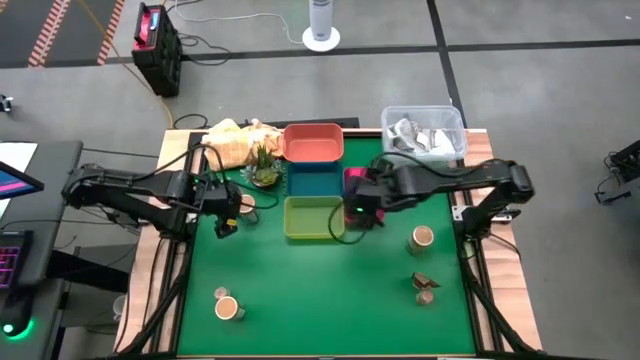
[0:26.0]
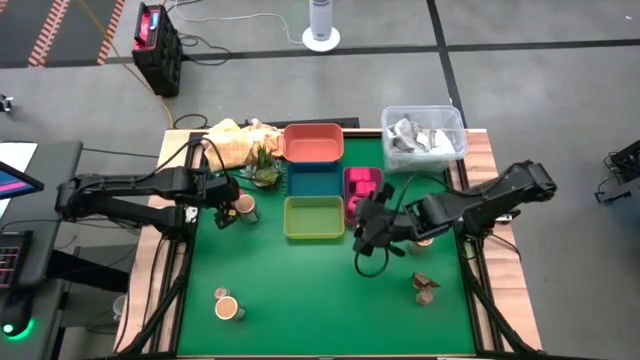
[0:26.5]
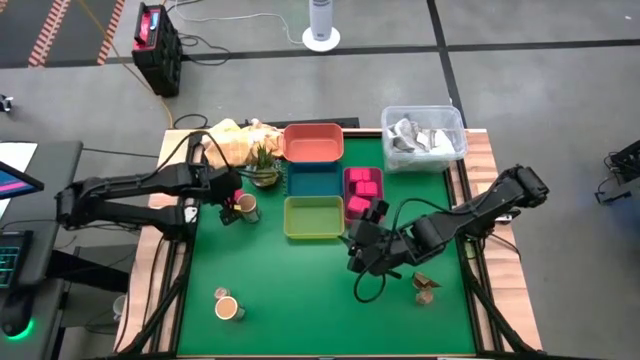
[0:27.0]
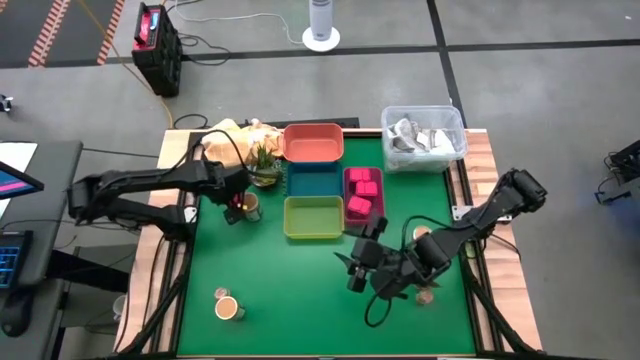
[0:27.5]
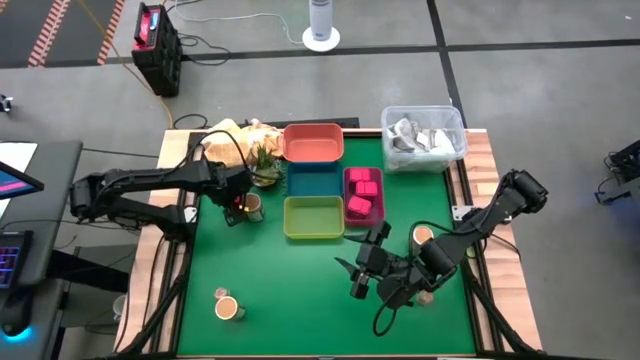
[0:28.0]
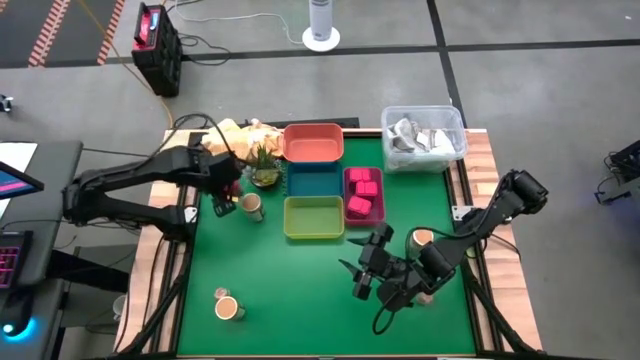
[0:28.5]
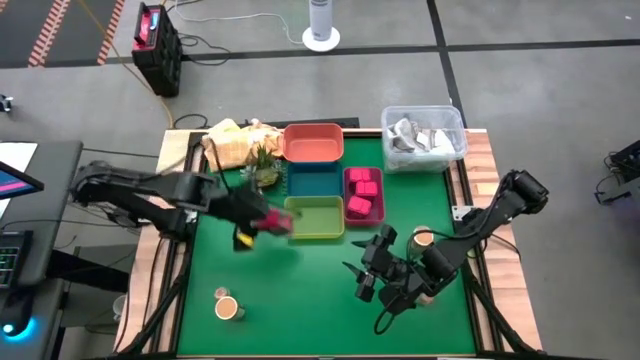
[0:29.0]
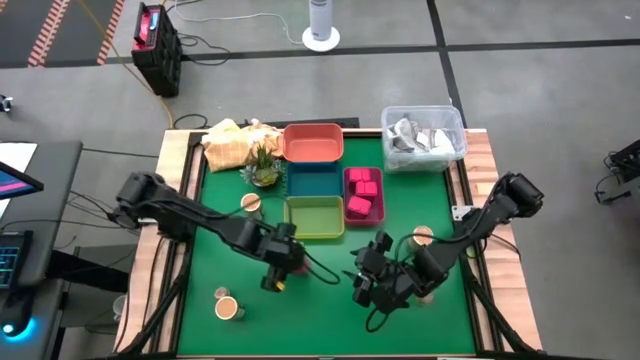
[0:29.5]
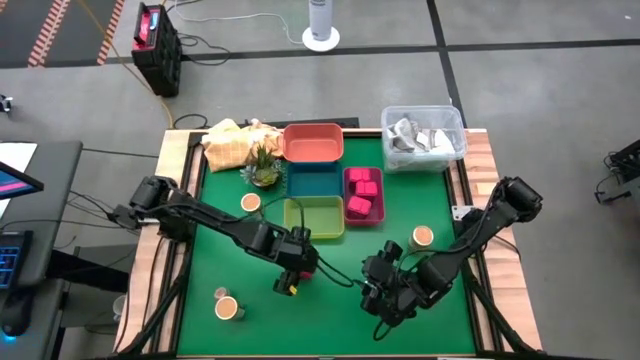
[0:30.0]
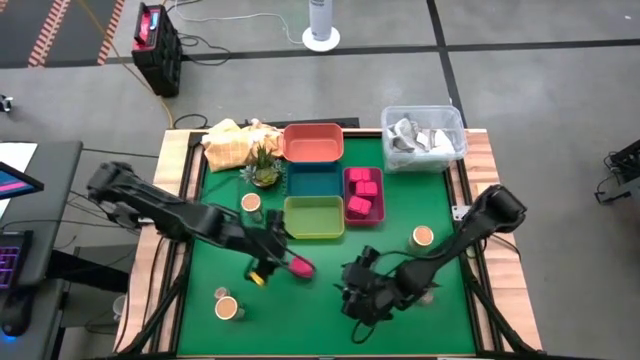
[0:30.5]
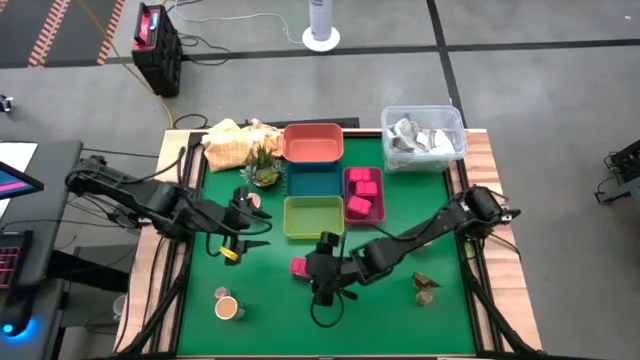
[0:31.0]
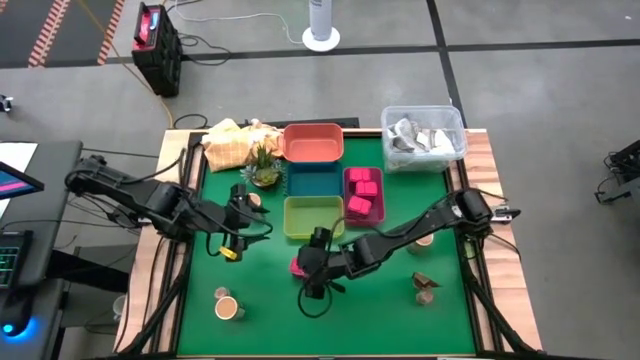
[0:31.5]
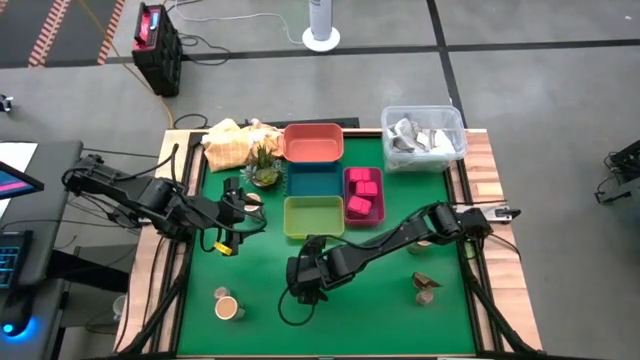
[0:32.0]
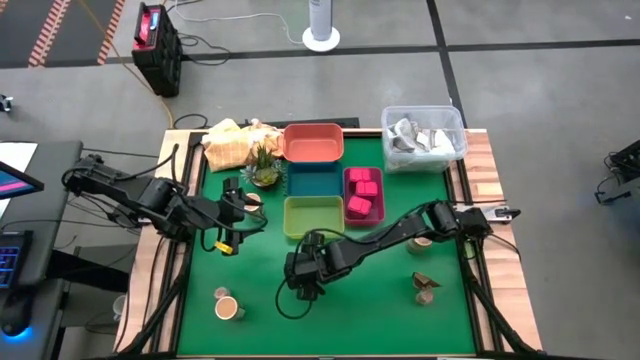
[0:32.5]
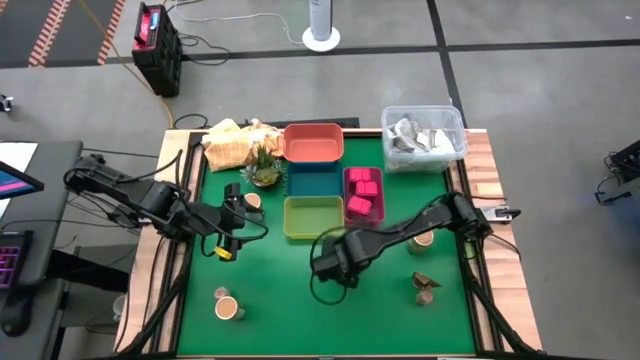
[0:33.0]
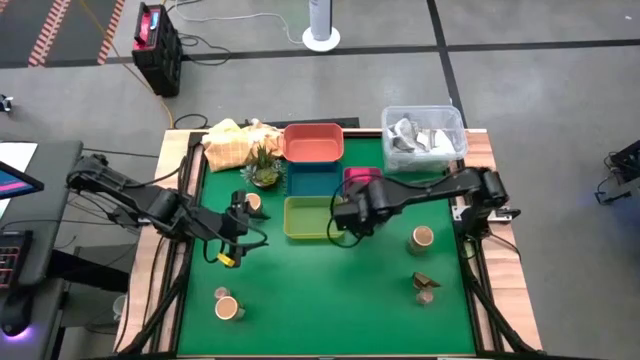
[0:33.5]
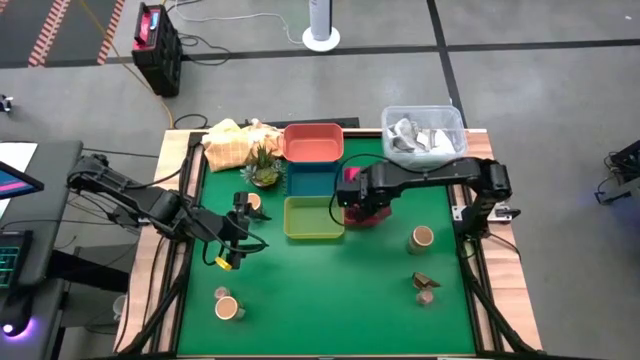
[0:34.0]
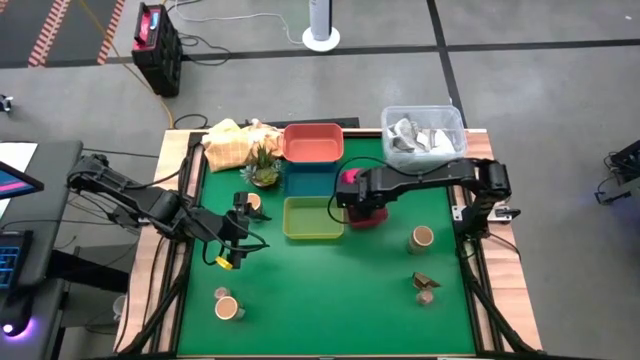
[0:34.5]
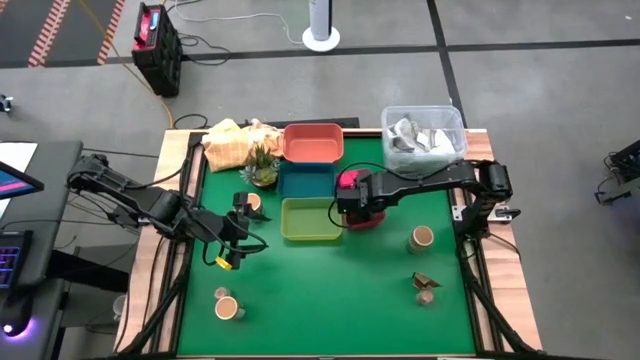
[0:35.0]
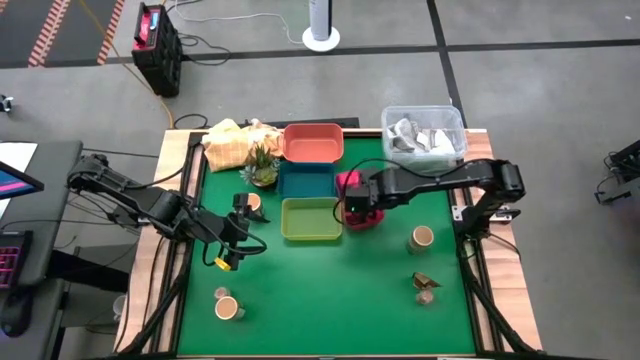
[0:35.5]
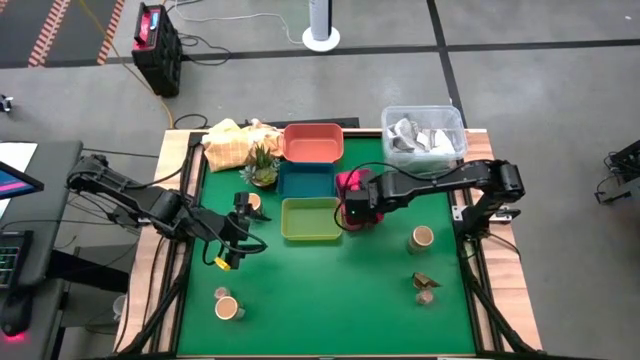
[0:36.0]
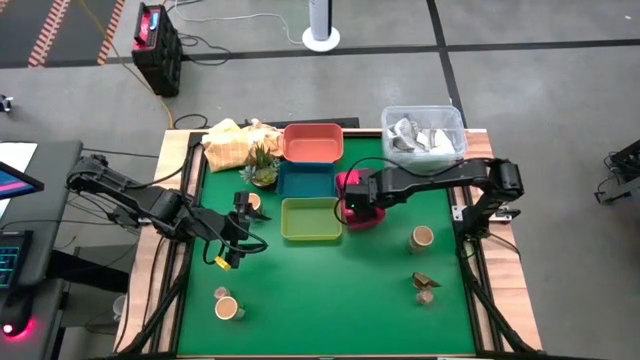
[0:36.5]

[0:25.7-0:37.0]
Task: Sort spices by type
Put the red seasoning can into the red bin

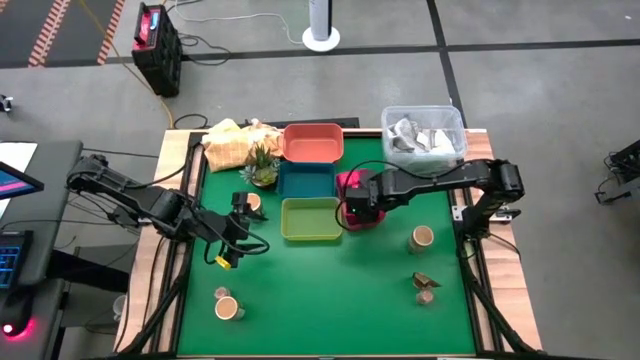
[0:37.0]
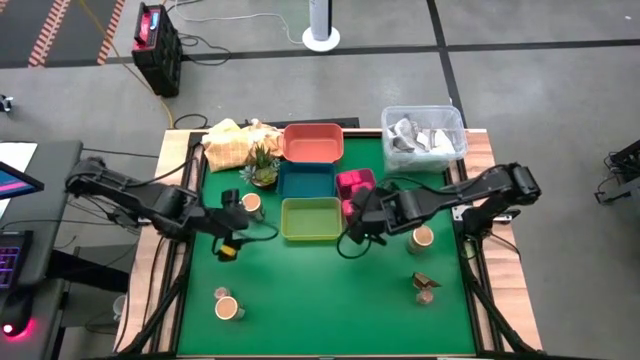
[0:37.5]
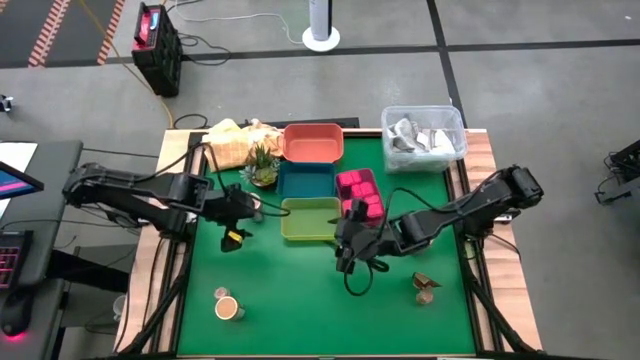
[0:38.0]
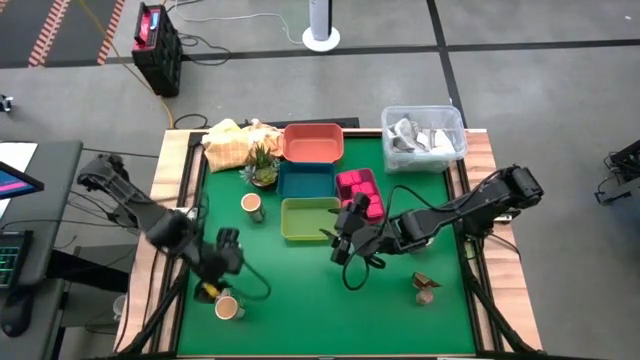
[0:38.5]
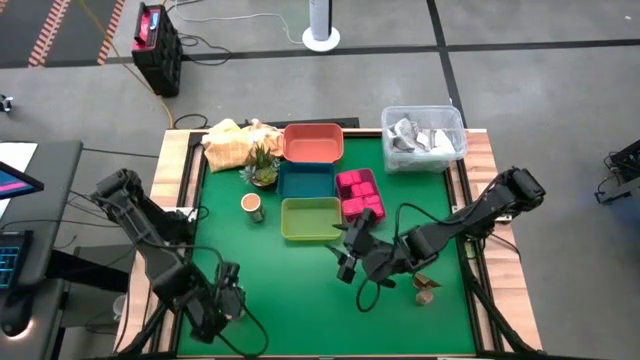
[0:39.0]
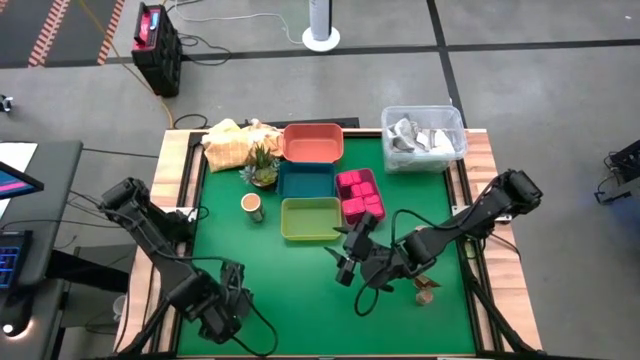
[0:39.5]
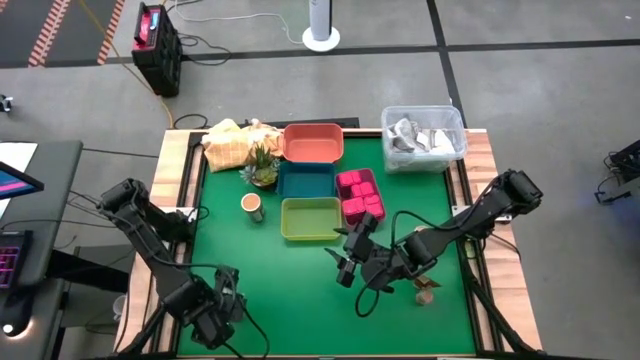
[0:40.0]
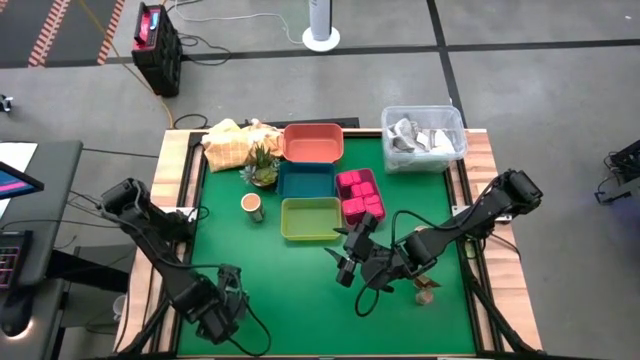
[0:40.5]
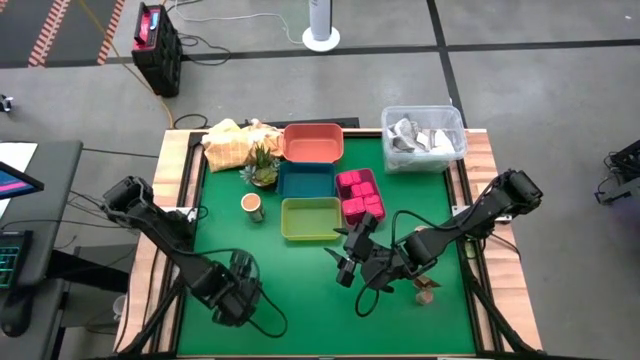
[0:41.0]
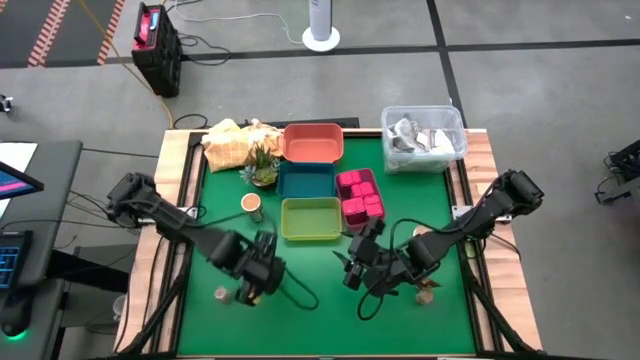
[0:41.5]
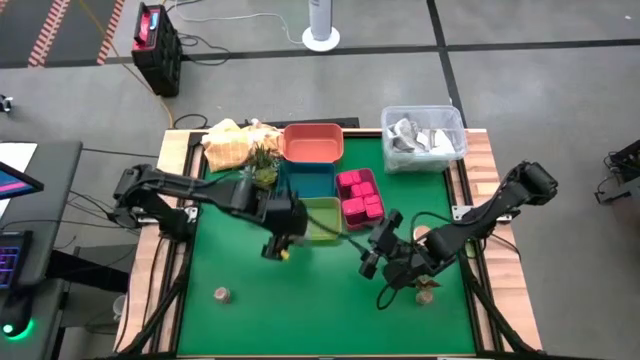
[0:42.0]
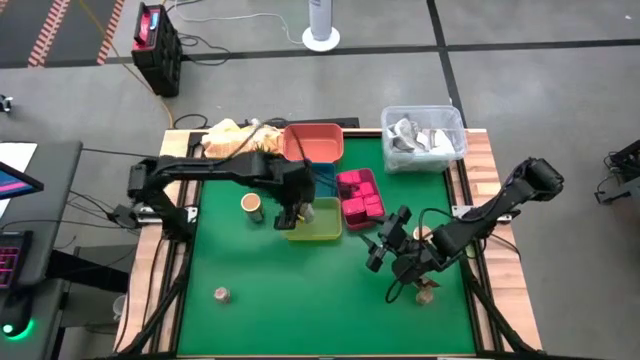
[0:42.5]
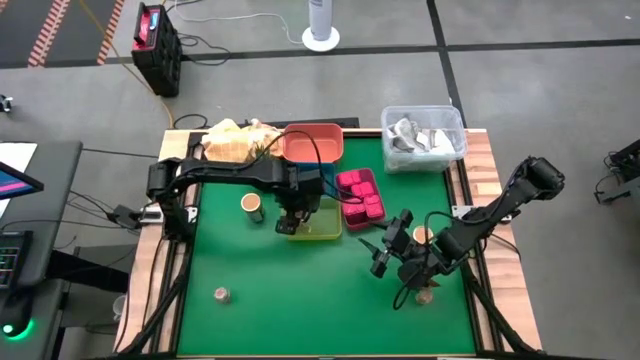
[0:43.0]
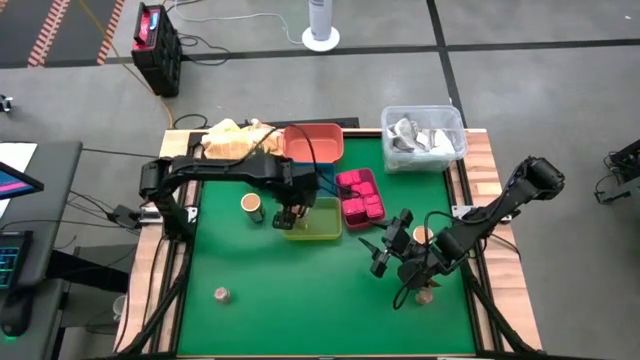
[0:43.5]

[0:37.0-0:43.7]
Put the bottom left gold seasoning bottle into the yellow bin

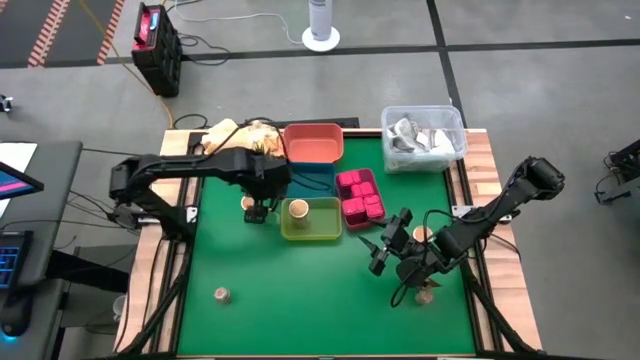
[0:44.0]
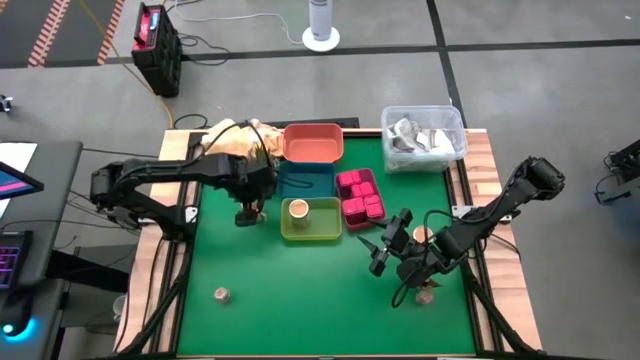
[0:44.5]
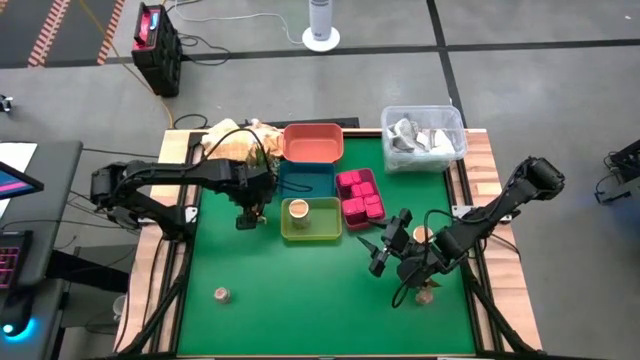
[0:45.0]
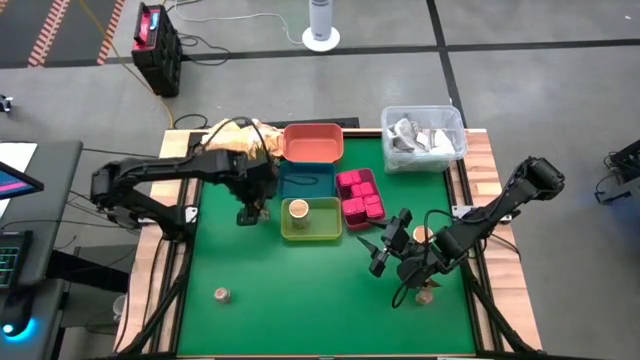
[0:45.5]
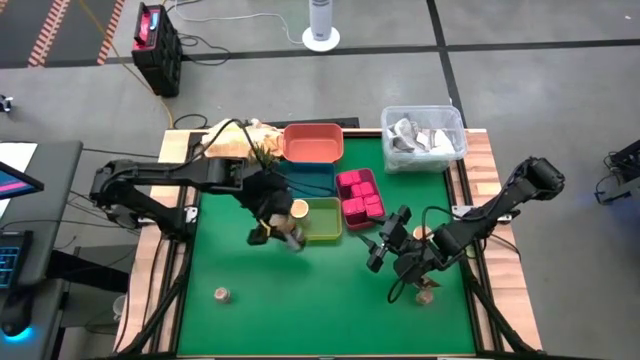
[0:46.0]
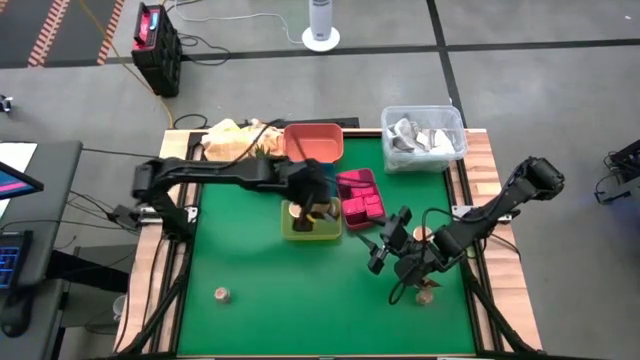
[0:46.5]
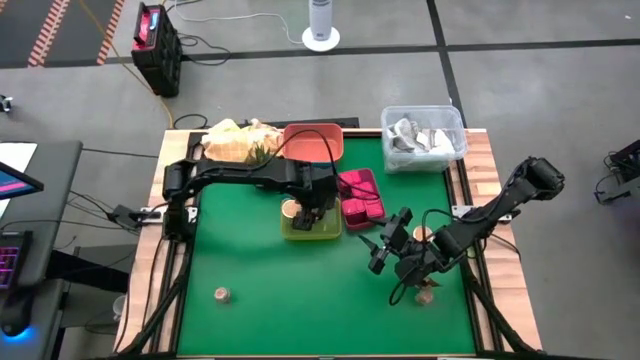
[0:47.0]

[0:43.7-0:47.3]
Put the top left gold seasoning bottle into the yellow bin

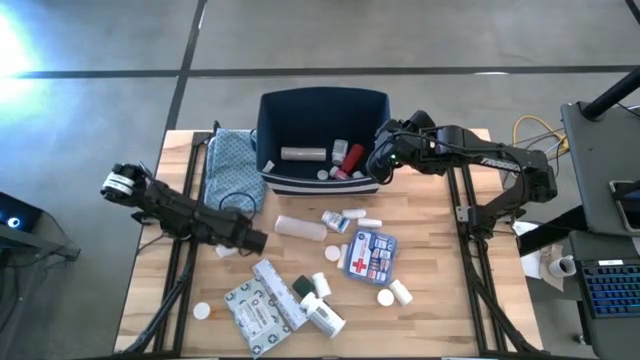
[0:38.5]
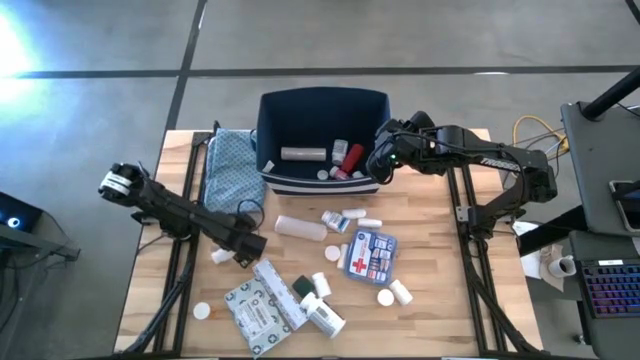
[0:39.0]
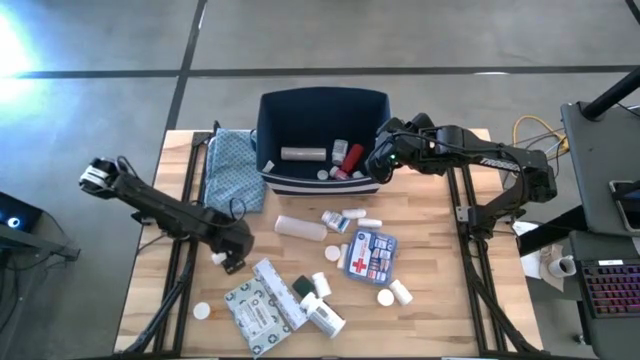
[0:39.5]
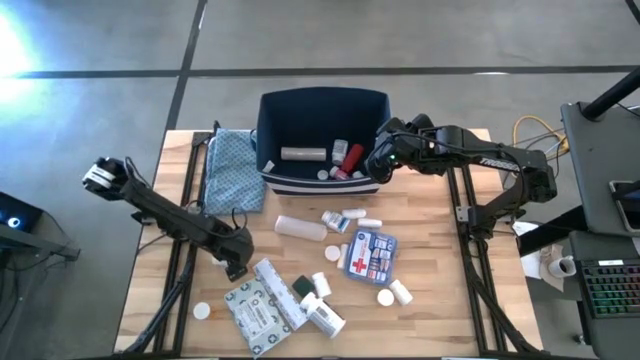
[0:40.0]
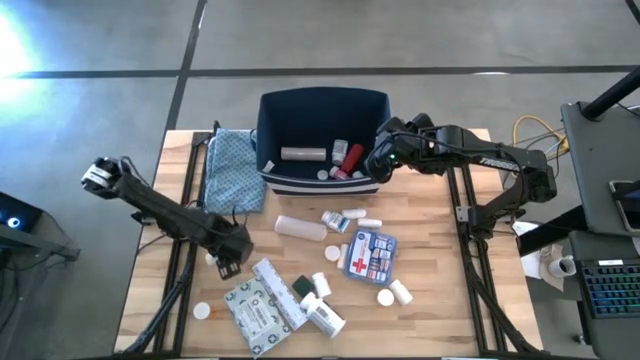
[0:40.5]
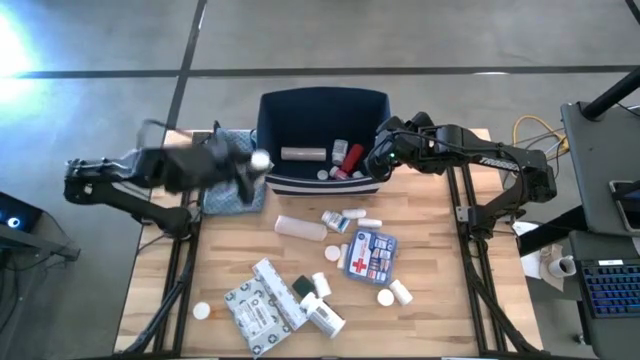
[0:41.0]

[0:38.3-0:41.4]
Task: Pick & place medical supplies in basket/bin
Put the white pill bottle into the blue bin
